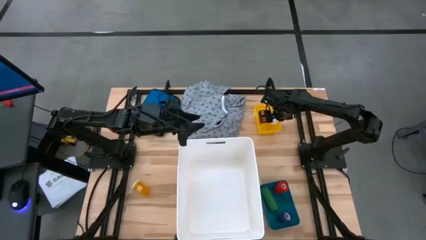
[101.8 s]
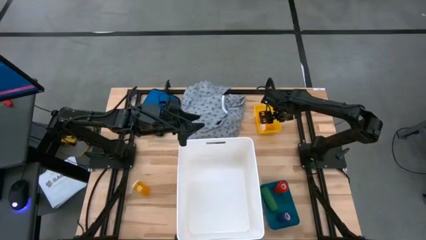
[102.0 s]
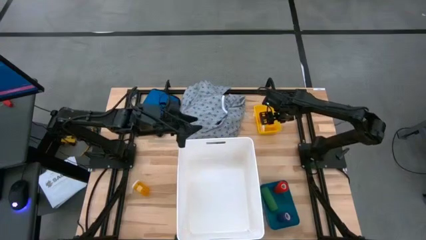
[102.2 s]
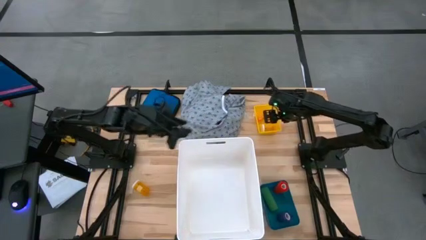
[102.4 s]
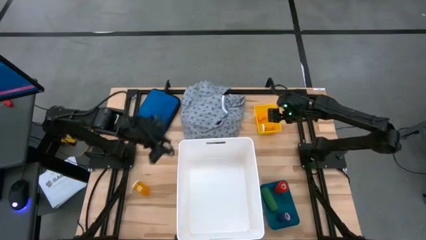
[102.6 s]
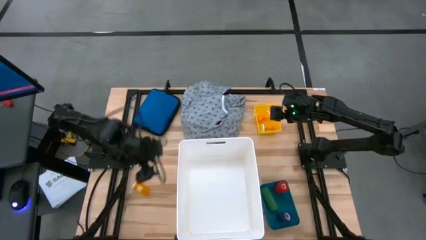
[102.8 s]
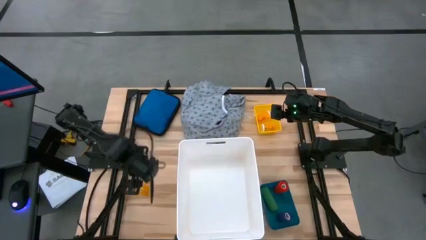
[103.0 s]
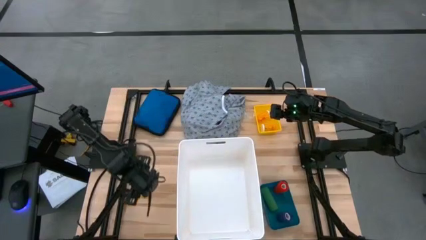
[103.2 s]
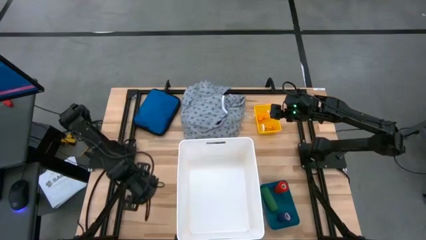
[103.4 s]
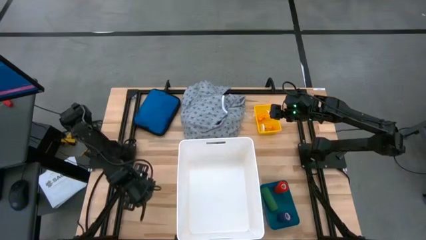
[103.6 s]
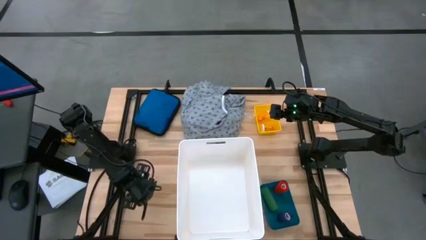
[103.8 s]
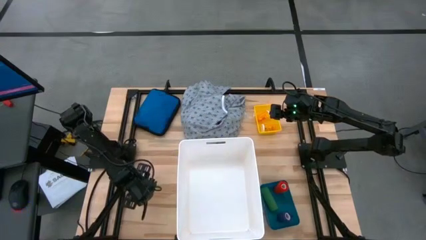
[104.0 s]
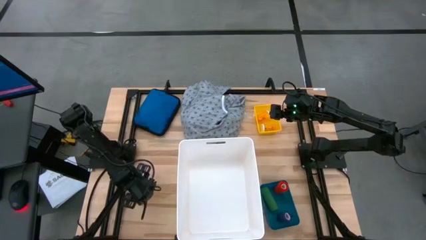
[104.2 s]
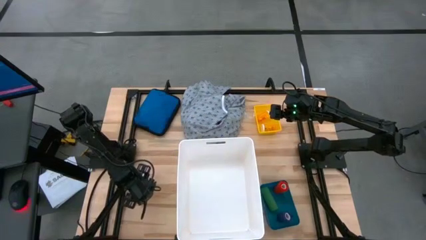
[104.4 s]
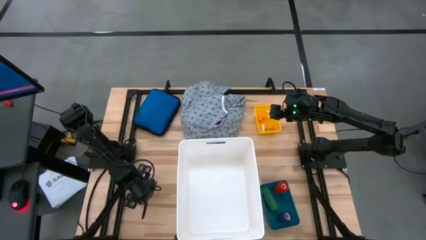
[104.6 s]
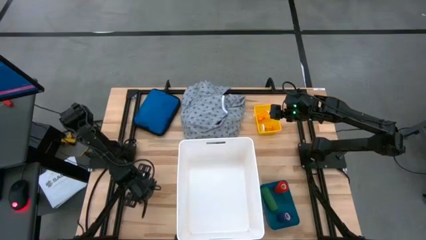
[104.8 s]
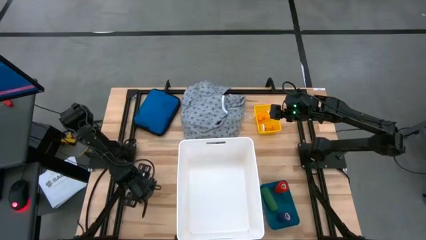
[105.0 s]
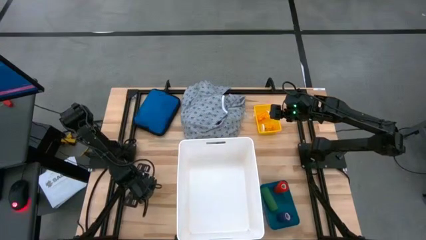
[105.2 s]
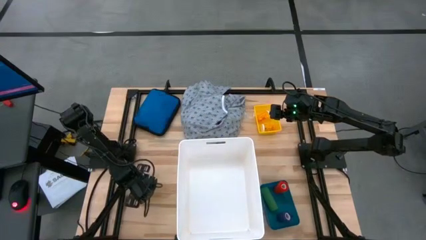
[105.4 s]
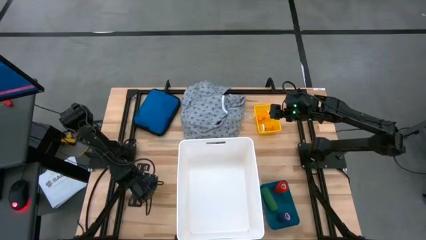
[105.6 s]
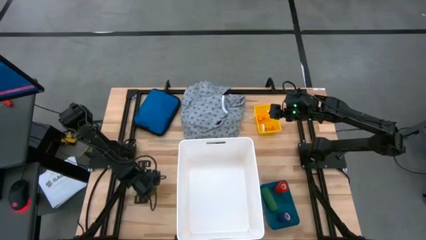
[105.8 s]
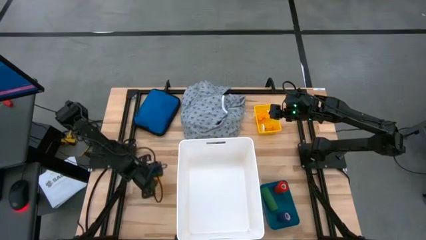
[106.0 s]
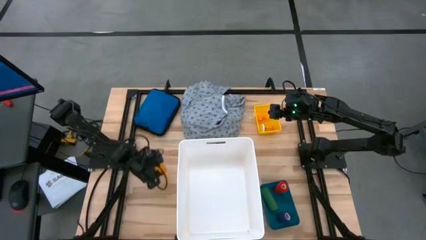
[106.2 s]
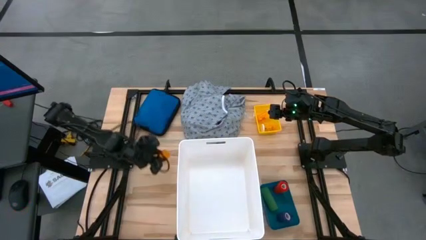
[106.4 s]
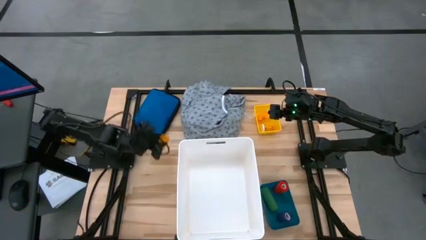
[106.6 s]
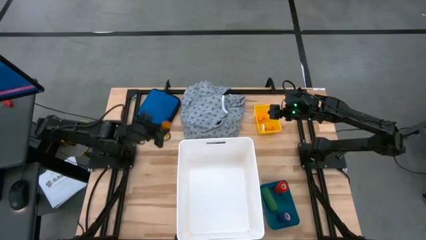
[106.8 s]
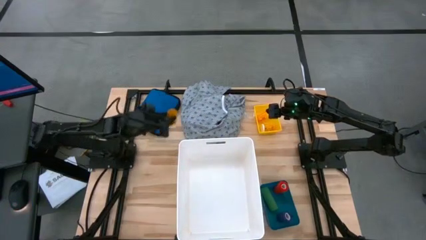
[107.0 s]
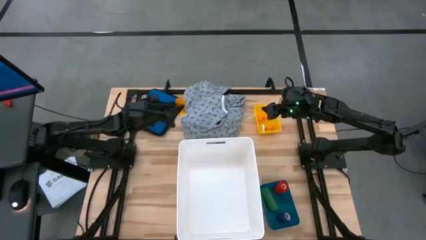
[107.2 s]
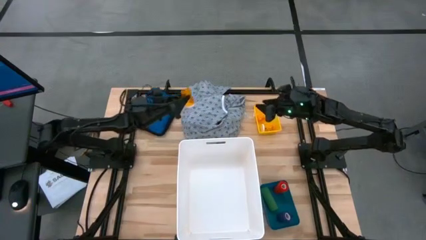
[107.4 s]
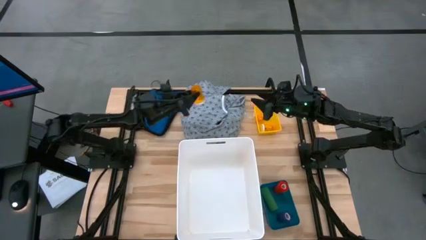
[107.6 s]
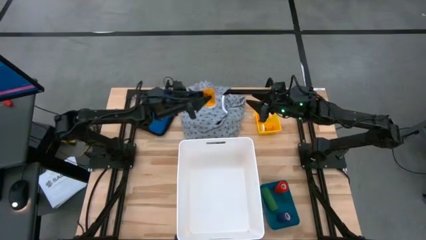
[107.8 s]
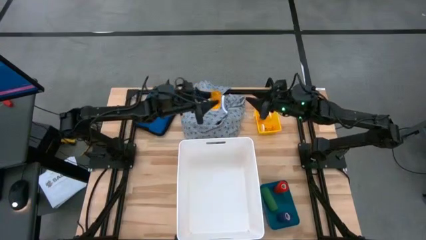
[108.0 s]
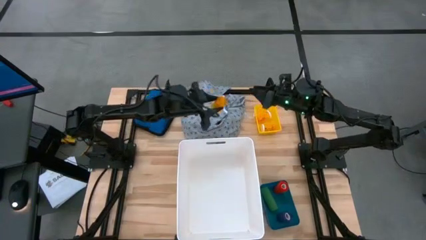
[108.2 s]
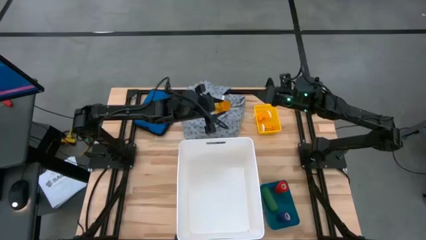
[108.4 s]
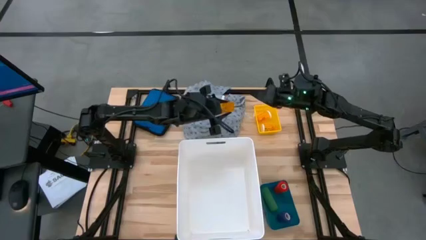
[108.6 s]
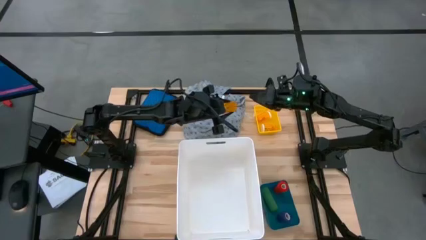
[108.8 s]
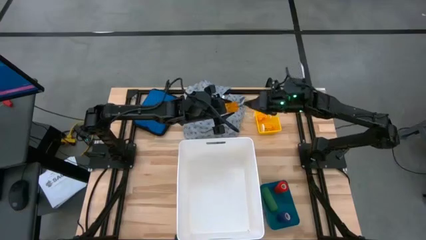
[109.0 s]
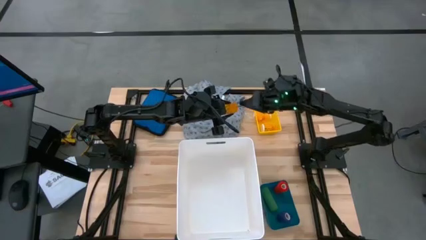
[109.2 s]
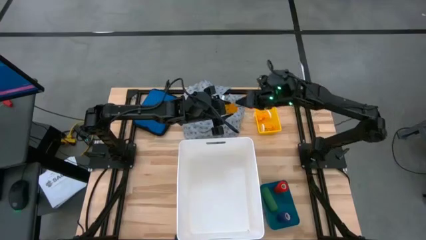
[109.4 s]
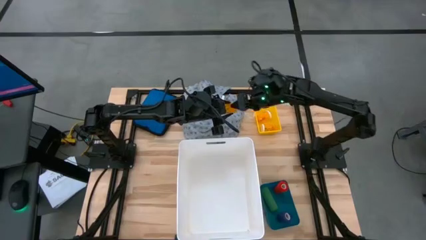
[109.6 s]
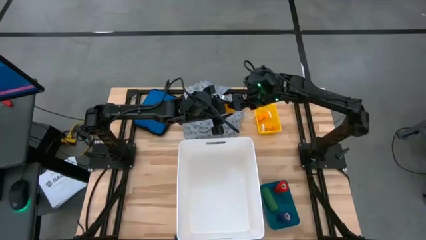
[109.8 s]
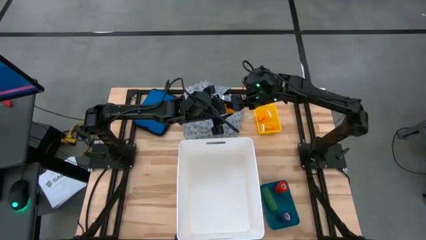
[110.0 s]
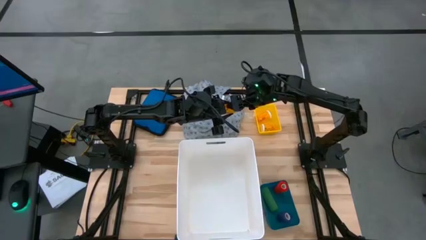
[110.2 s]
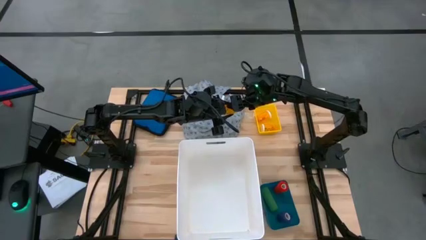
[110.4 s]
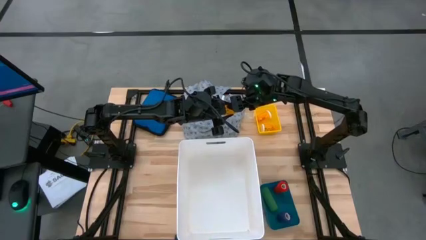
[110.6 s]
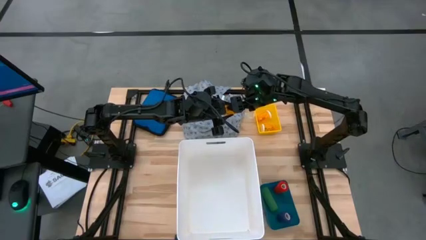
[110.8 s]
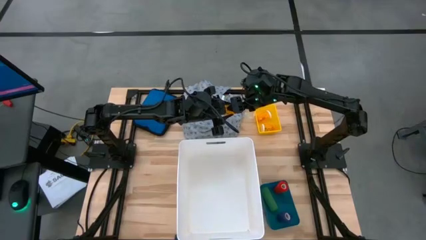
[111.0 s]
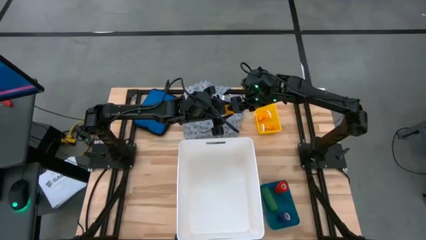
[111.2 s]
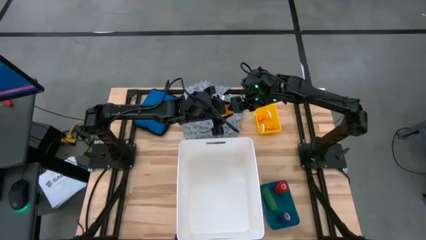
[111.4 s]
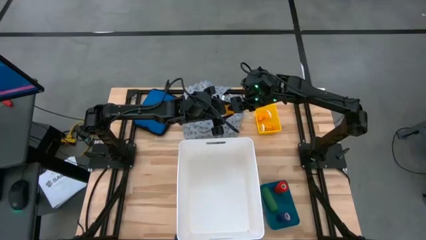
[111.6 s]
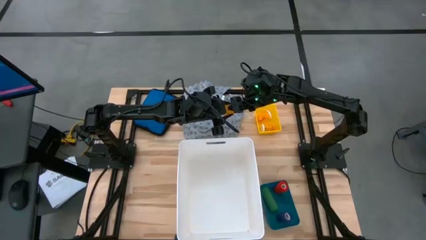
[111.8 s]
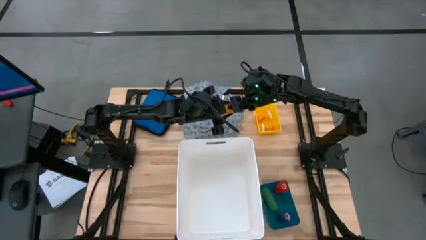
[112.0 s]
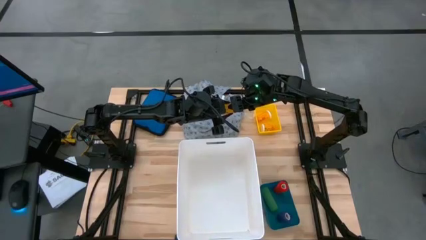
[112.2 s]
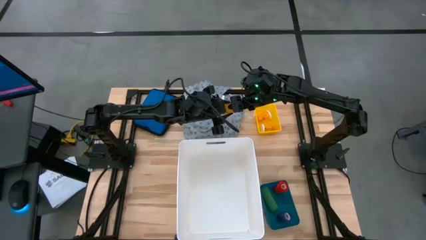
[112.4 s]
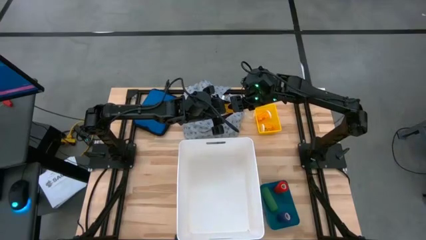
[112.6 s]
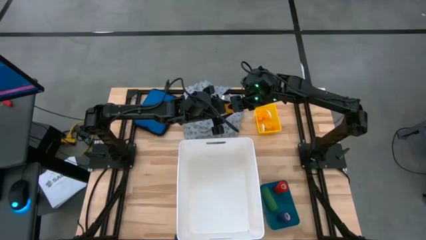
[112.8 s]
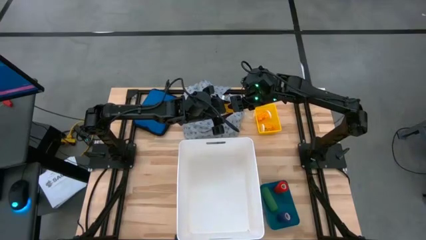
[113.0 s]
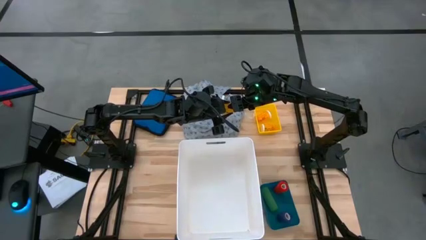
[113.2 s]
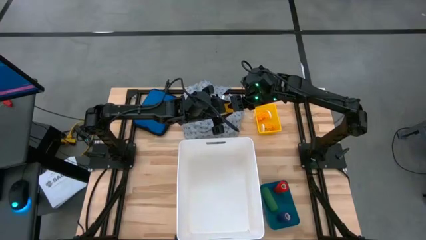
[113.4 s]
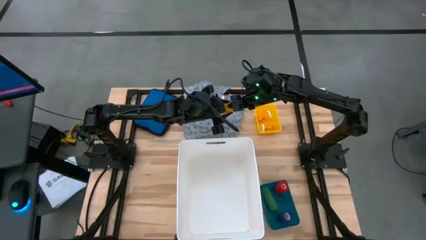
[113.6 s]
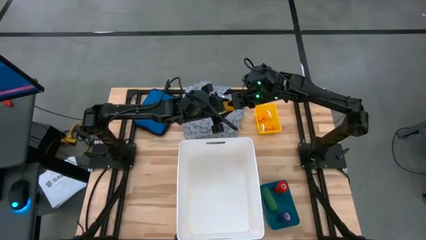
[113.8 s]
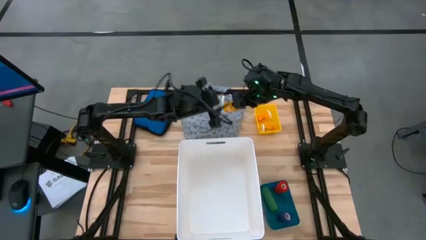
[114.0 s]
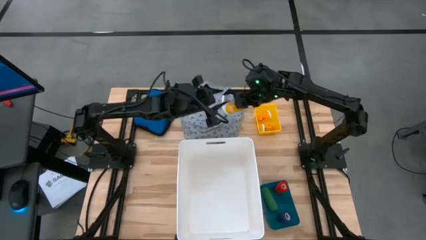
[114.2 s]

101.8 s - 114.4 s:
Task: Pick & place medical supplies in basket/bin
Put the orange pill bottle into the yellow bin

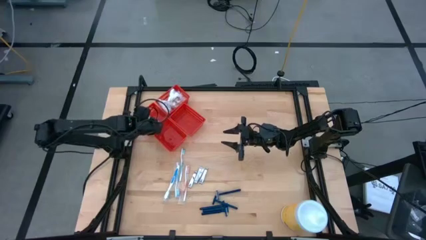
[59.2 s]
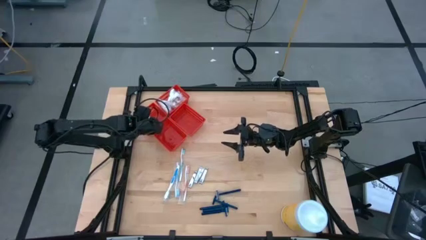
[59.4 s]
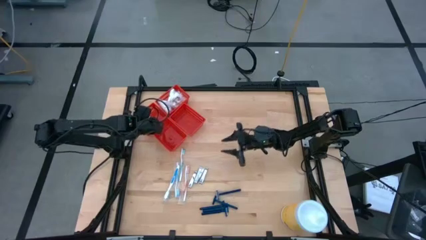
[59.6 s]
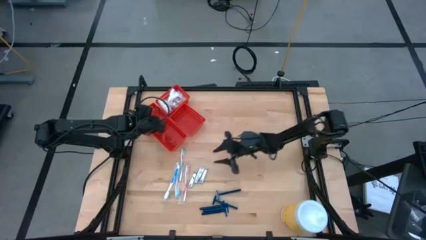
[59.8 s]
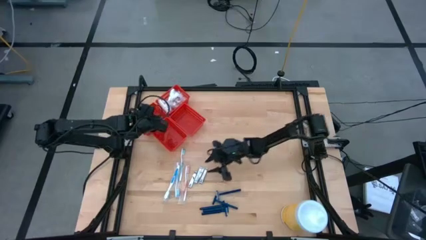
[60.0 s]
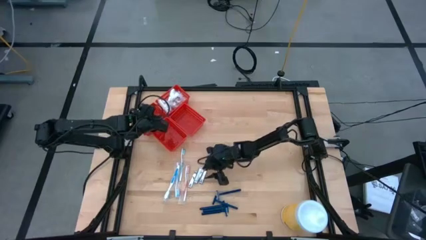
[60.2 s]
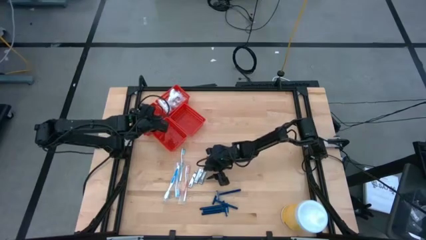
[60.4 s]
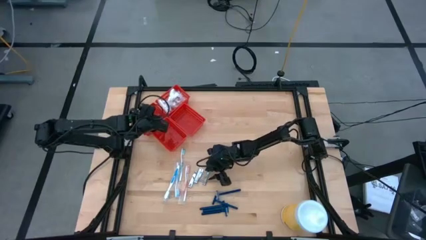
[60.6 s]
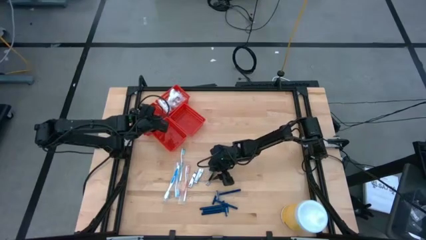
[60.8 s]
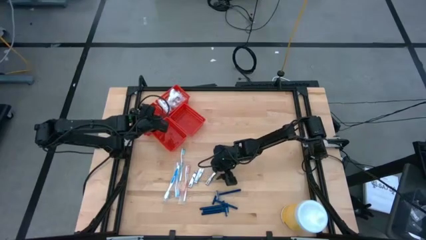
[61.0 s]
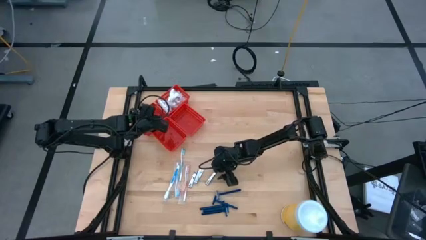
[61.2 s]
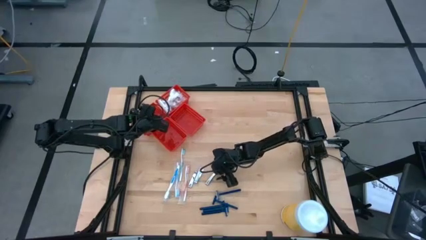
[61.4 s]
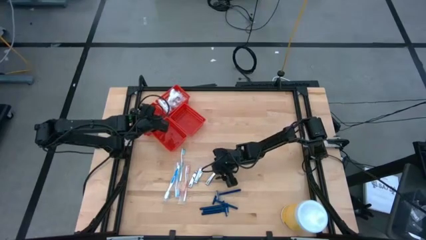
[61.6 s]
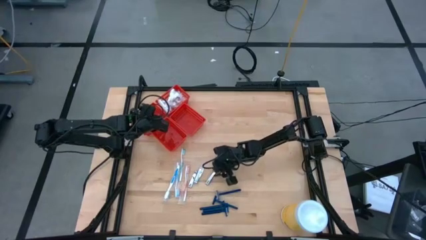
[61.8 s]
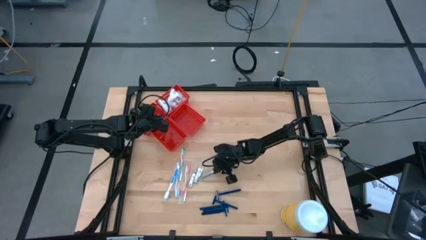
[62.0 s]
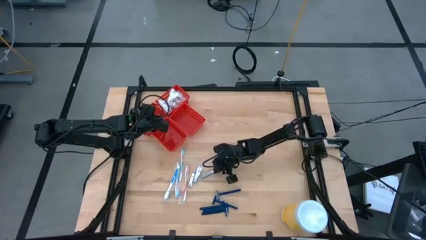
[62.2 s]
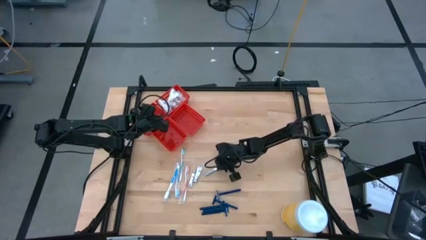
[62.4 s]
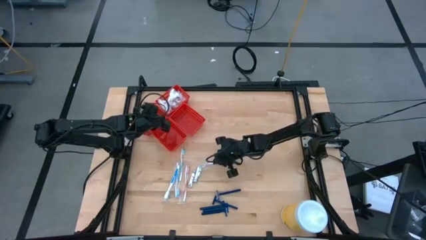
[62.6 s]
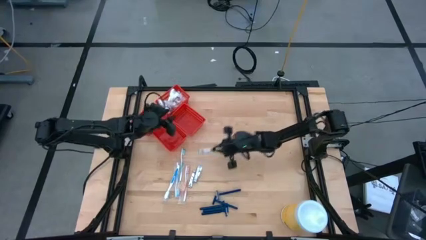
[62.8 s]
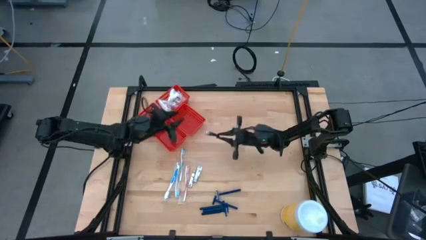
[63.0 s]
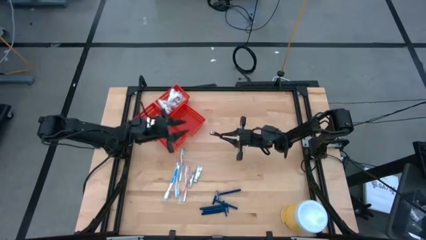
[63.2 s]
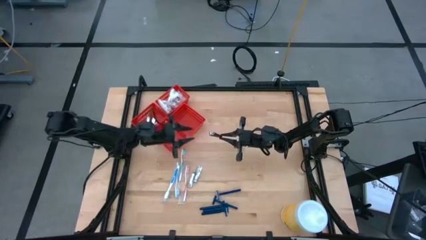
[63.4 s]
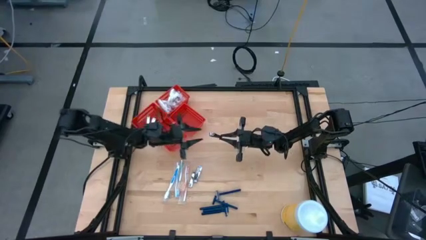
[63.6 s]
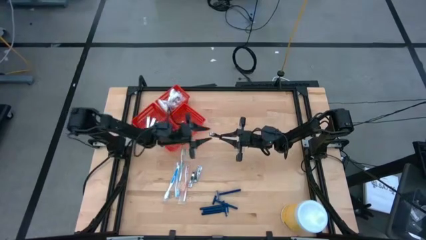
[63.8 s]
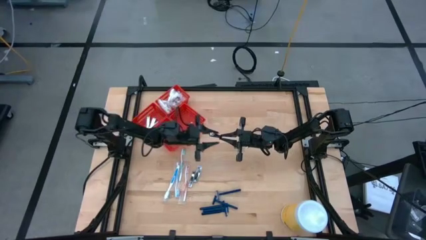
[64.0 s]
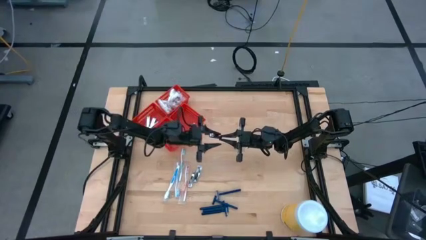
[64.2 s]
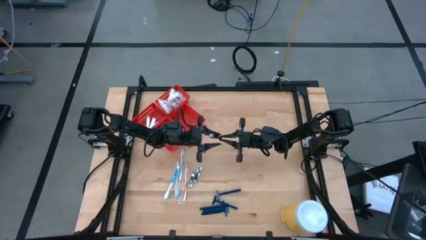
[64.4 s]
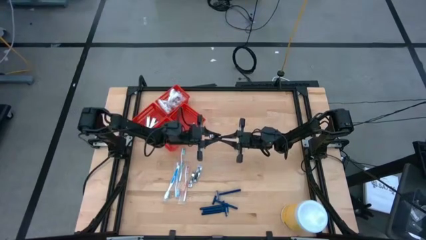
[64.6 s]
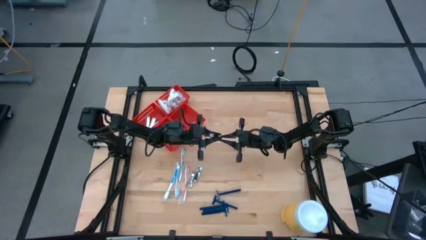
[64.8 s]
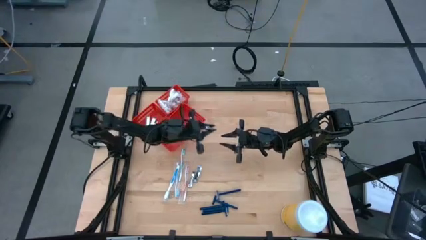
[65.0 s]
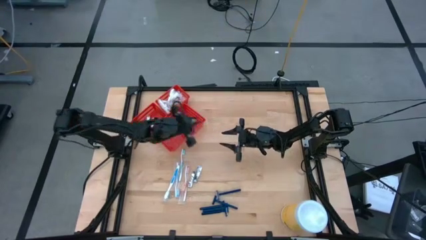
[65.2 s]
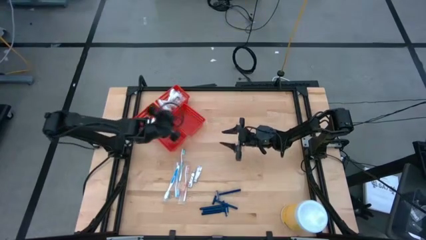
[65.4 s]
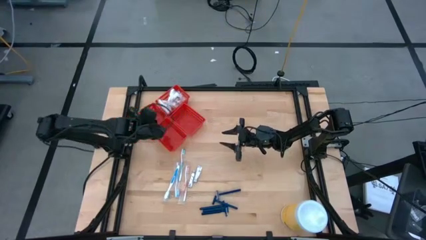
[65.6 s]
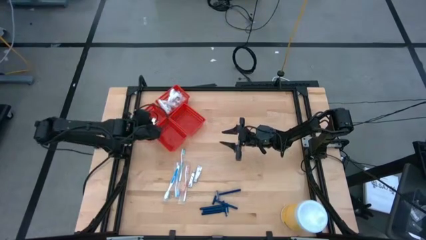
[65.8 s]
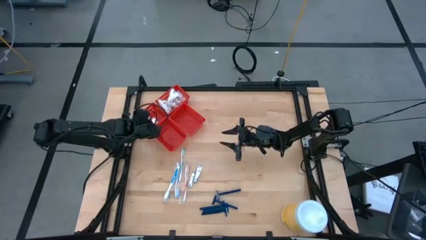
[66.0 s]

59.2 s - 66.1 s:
Task: Pick & Place Travel size toiletries
Put the right nail cutter into the horizontal left red bin
